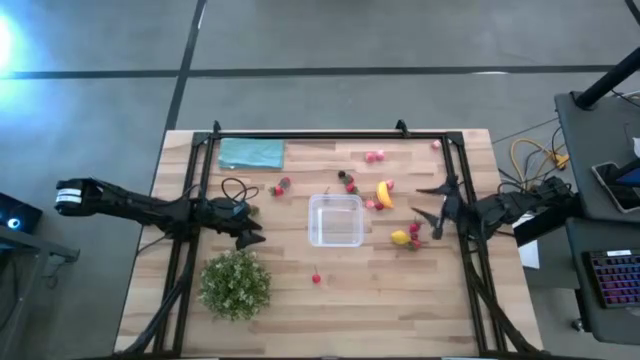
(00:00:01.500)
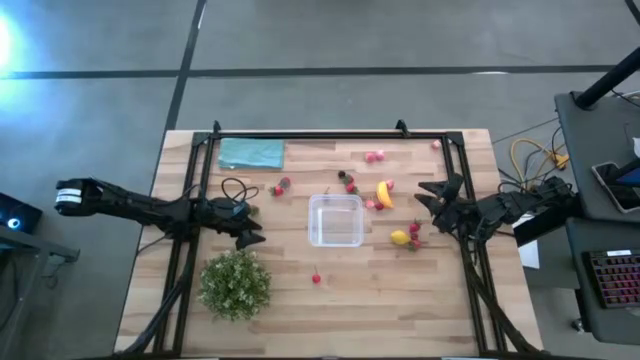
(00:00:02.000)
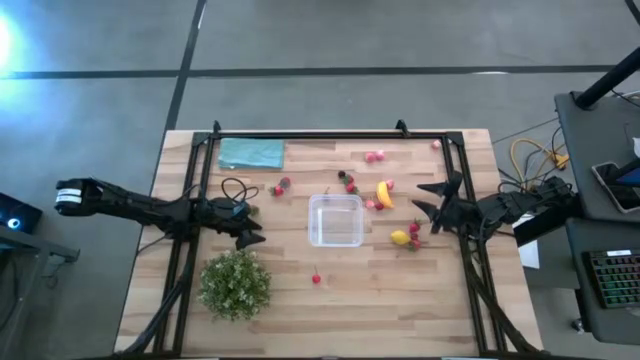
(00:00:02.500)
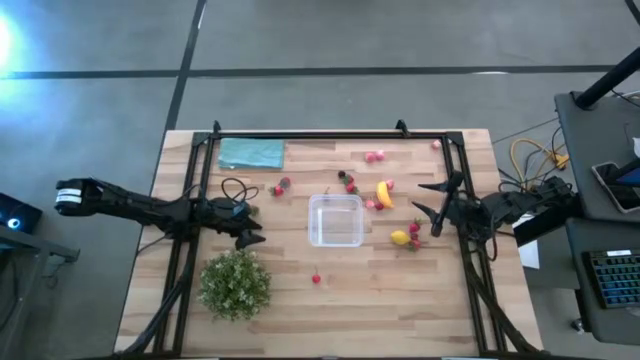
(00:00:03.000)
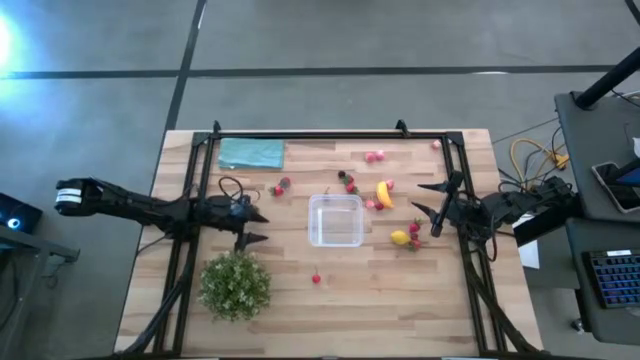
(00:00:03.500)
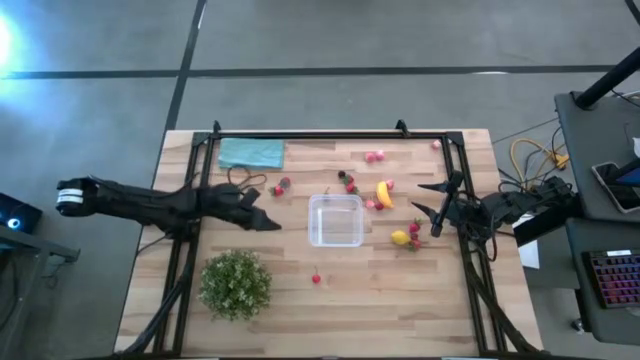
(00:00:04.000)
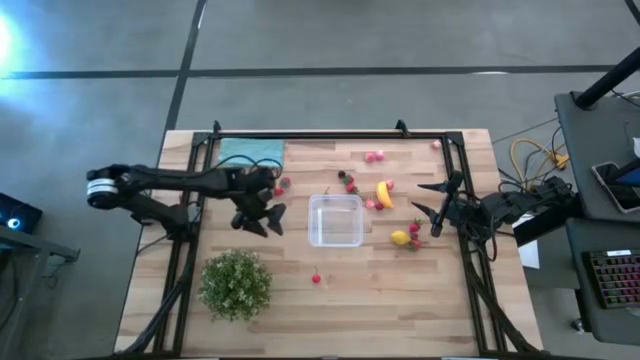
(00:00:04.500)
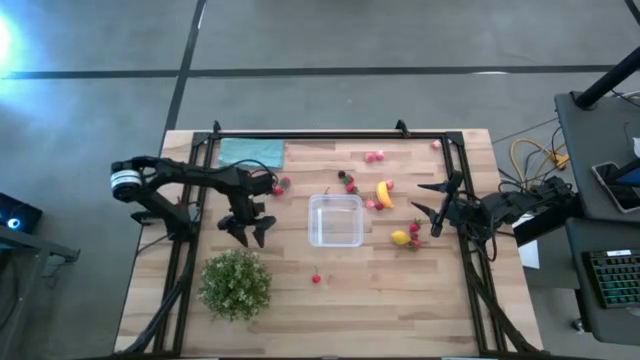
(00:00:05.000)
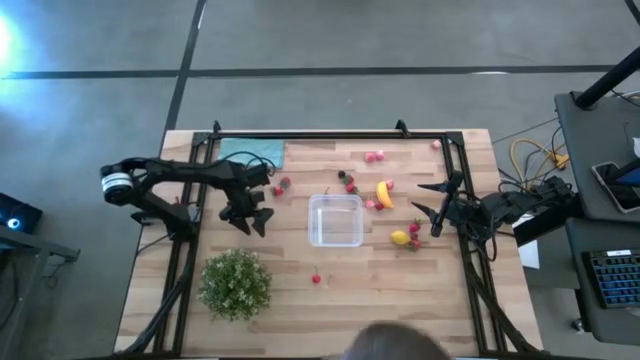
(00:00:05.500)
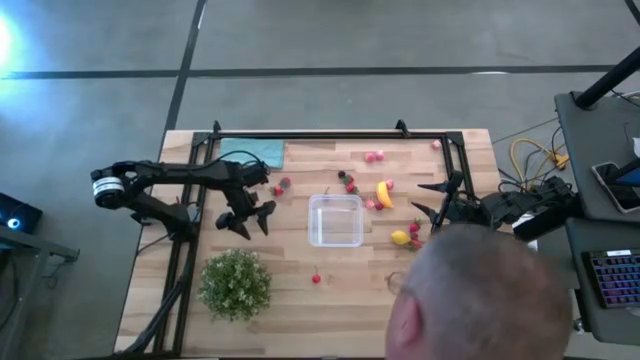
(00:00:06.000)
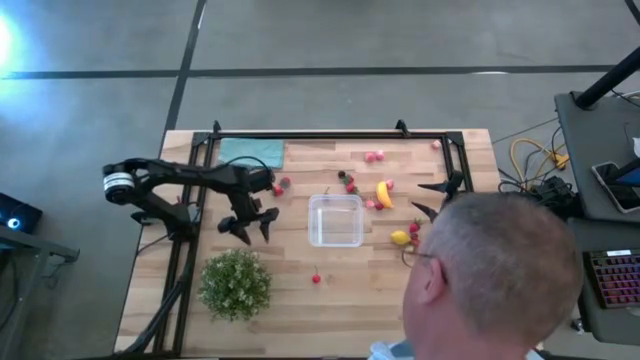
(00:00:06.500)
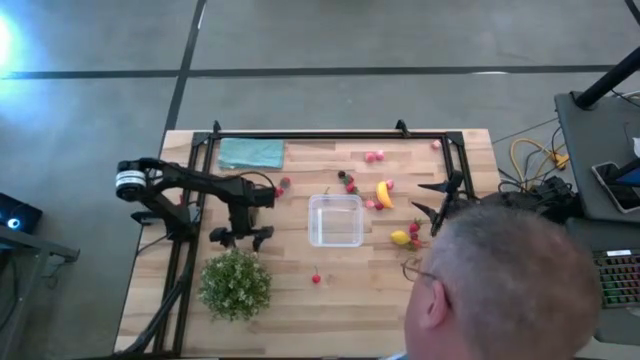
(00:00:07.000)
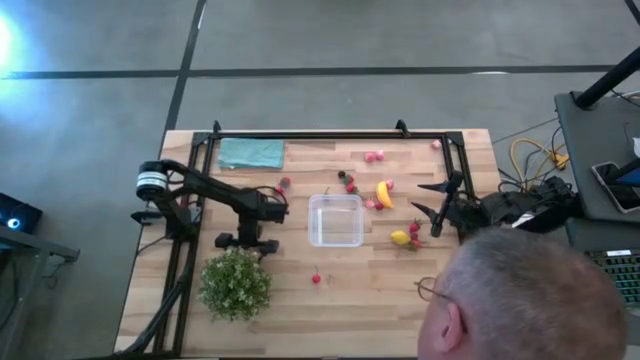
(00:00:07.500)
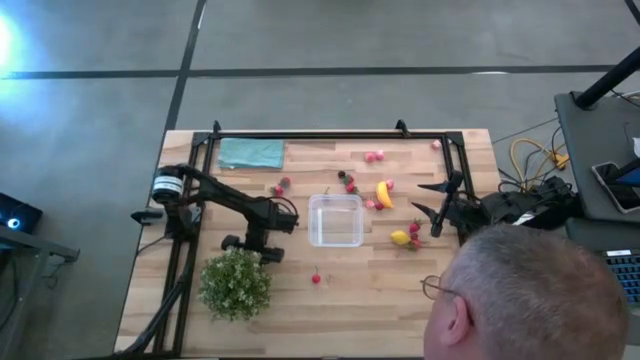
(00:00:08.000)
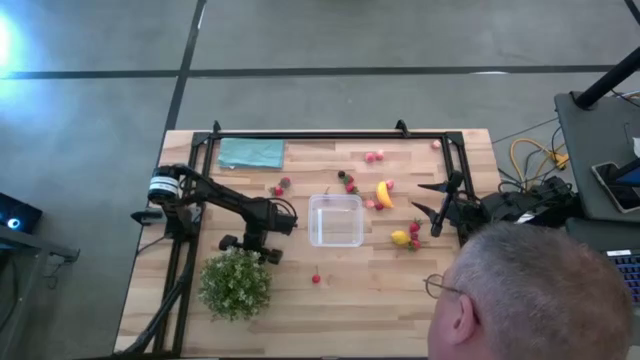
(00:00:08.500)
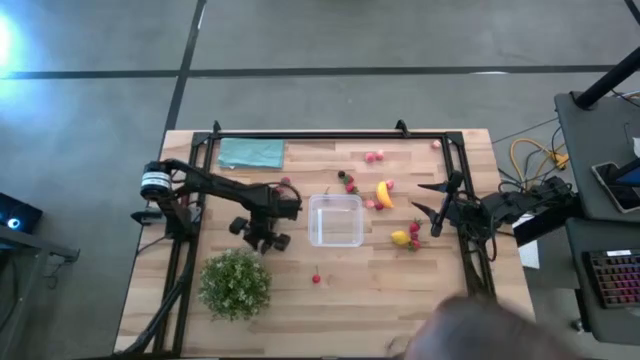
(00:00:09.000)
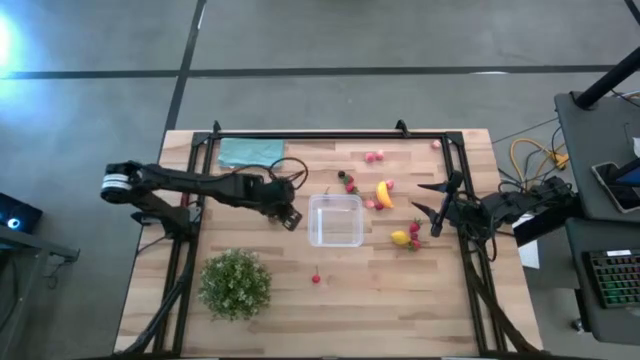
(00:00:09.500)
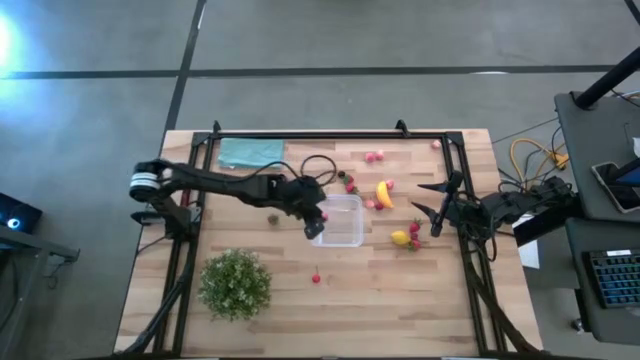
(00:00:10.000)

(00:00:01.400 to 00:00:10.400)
Task: Pick and placing Produce into tupperware
Put the peach into the transparent container

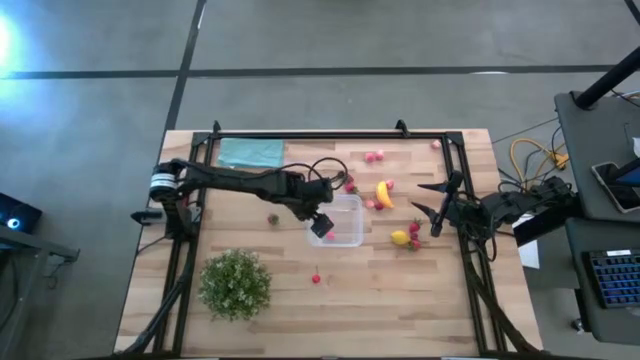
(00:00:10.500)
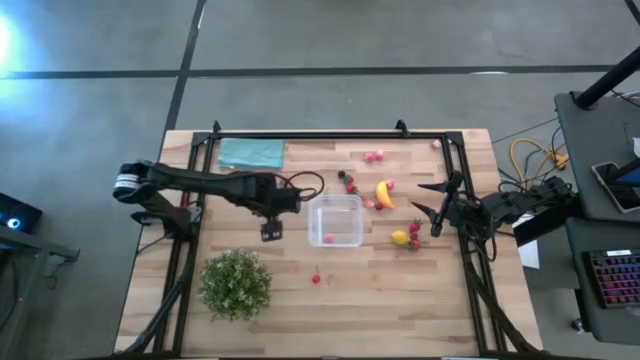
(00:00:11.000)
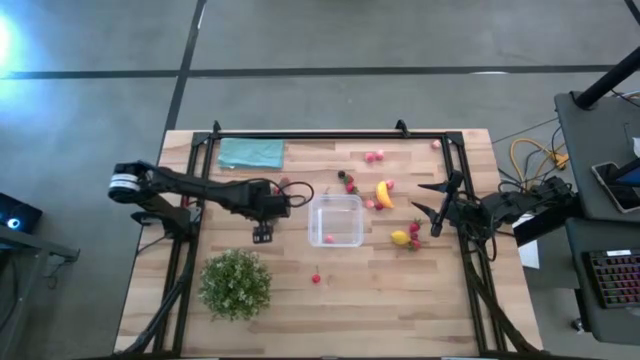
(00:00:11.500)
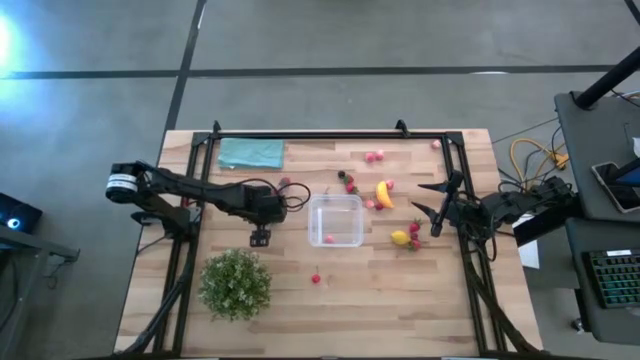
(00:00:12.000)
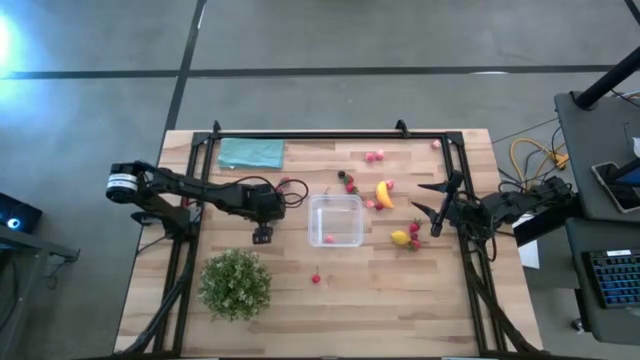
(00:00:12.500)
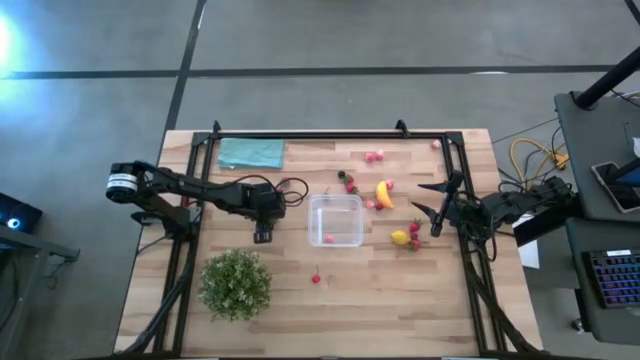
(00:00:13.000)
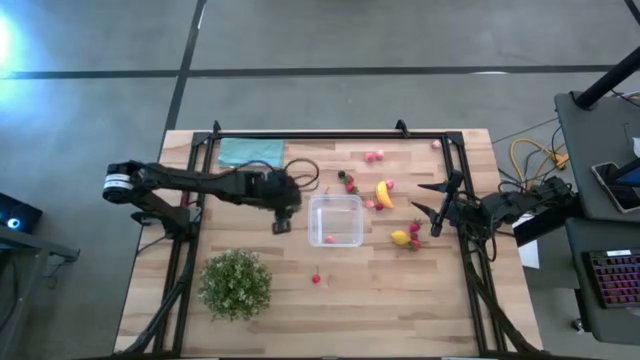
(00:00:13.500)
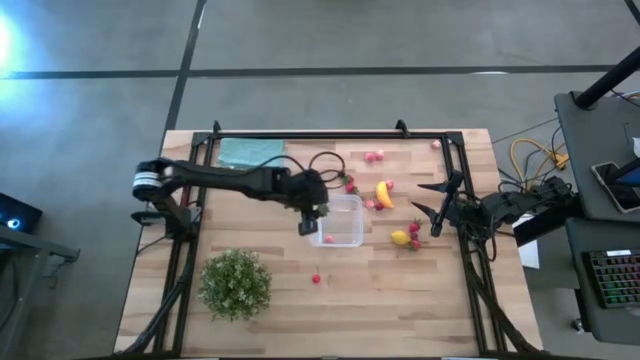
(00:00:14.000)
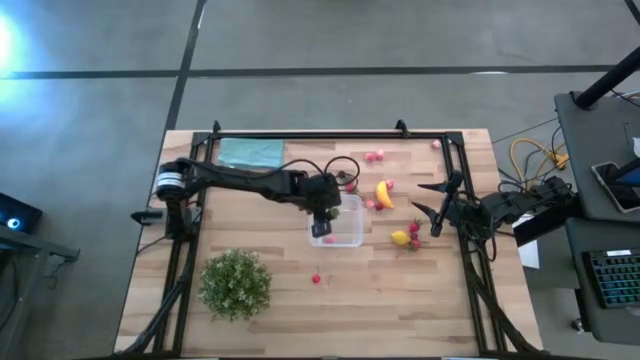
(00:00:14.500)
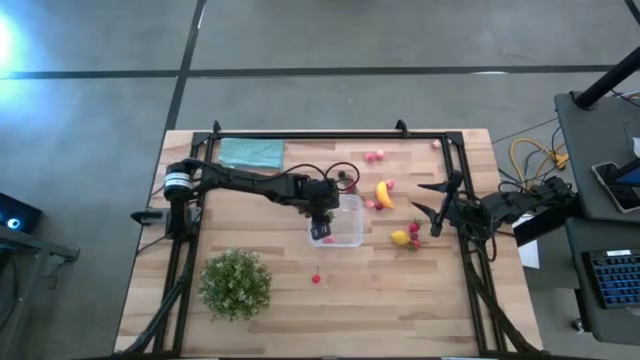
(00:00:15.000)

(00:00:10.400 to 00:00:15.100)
Put the strawberry into the transparent container

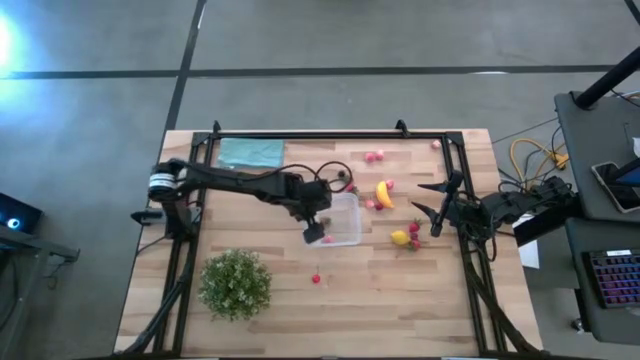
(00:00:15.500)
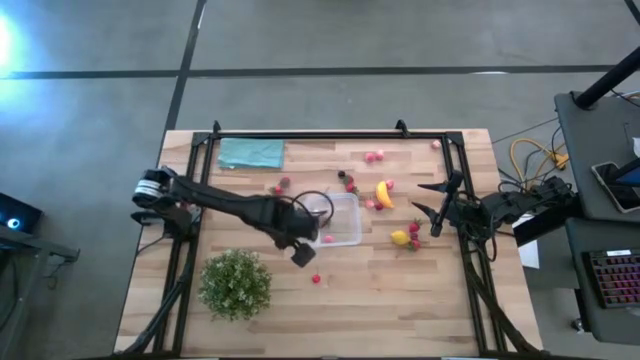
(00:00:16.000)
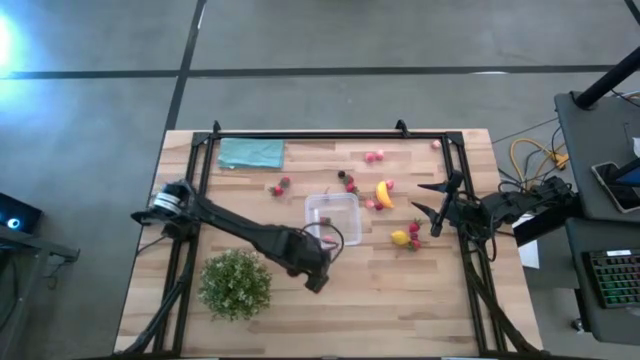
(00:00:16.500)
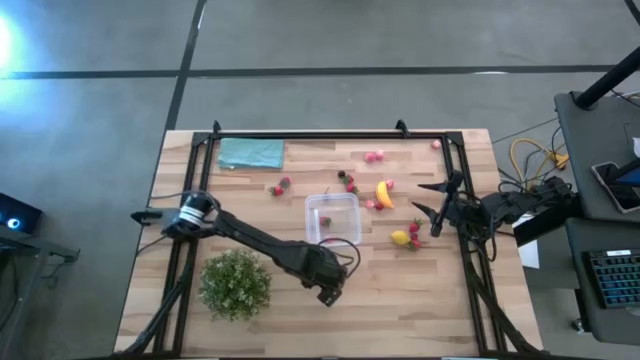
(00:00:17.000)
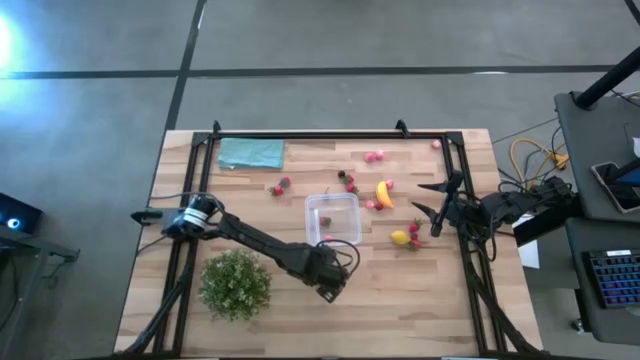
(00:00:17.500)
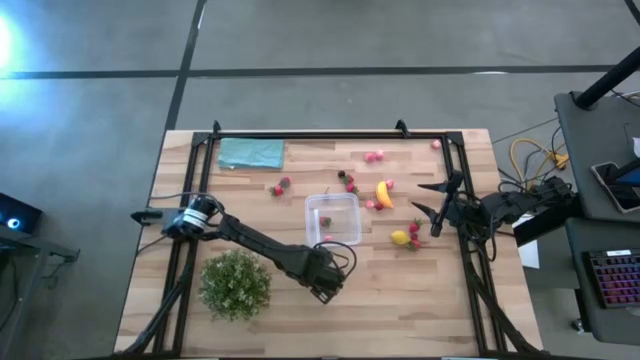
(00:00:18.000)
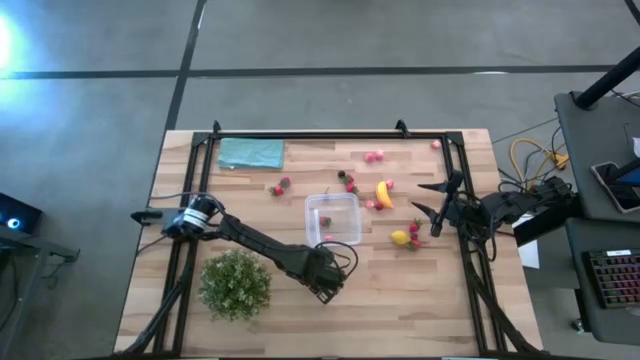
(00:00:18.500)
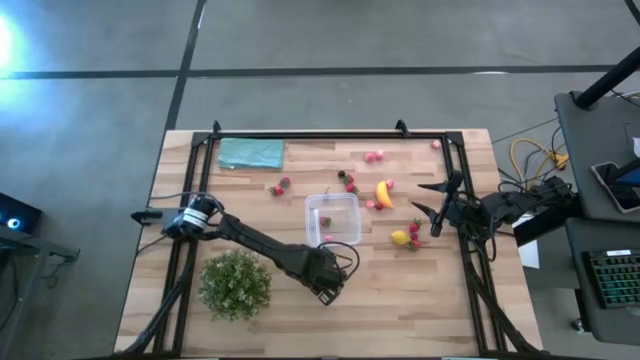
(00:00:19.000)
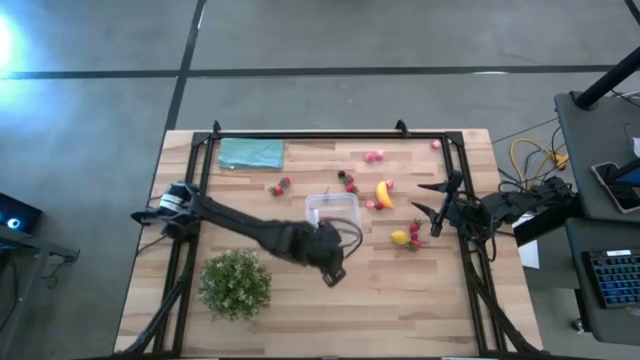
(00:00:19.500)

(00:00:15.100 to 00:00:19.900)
Put the cherry into the transparent container

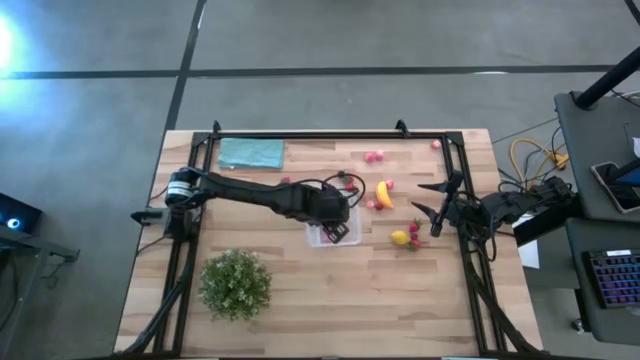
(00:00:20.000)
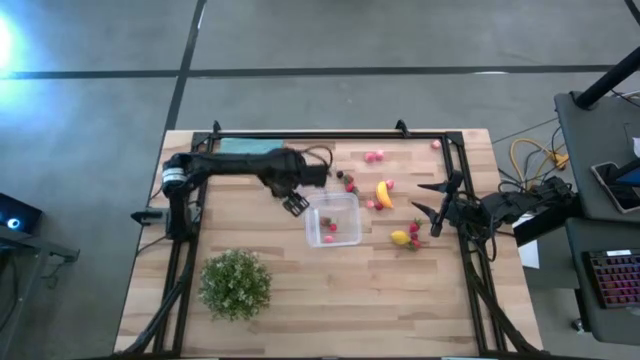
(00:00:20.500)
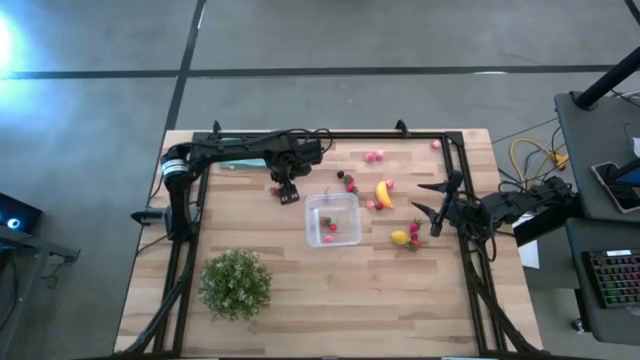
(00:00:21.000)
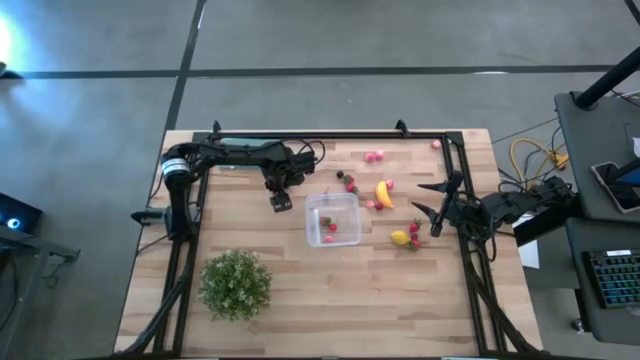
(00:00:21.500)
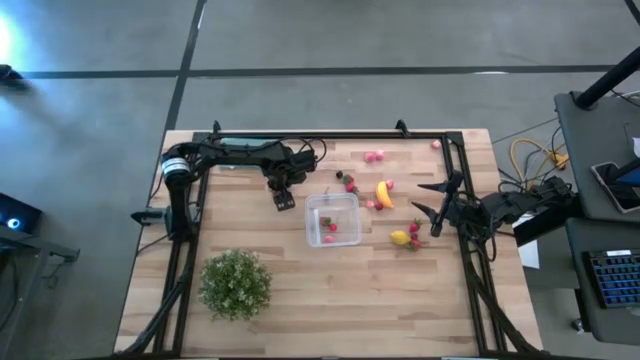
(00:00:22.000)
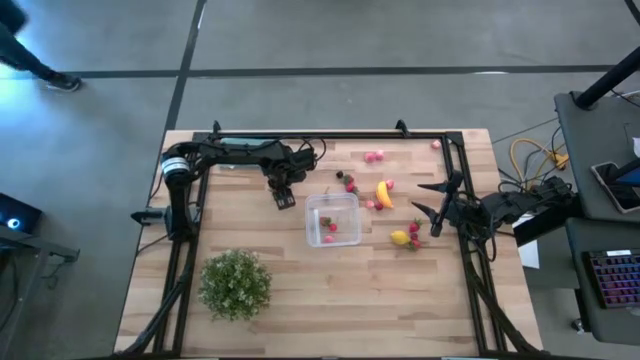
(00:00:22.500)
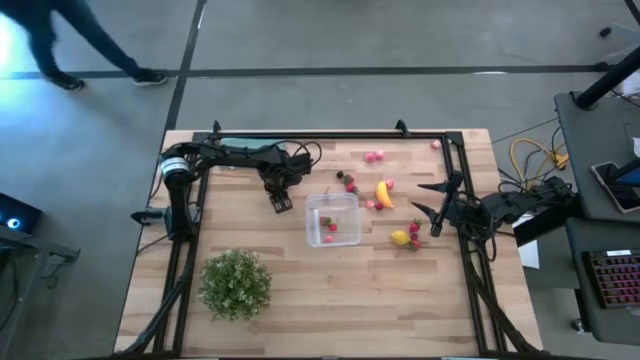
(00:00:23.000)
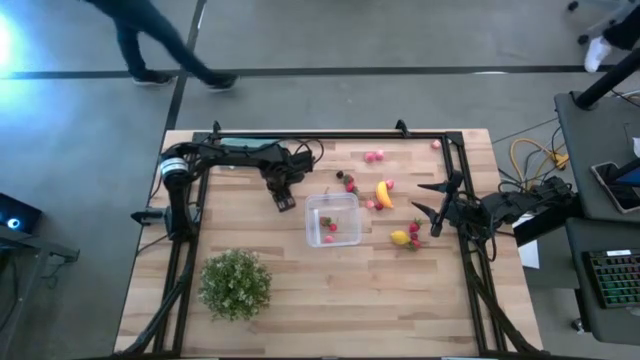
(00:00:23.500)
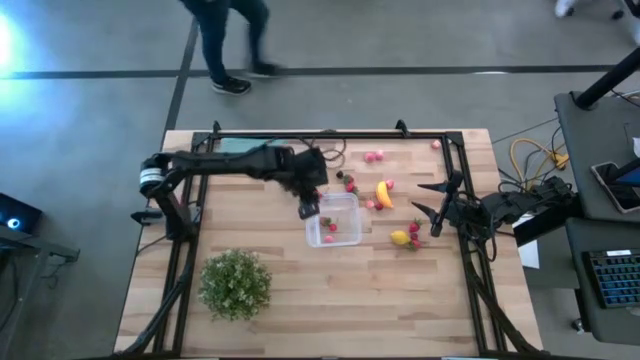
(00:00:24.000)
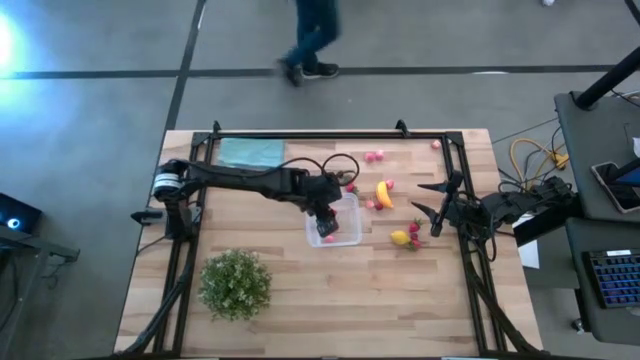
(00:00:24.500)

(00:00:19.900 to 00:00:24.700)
Put the strawberry into the transparent container
